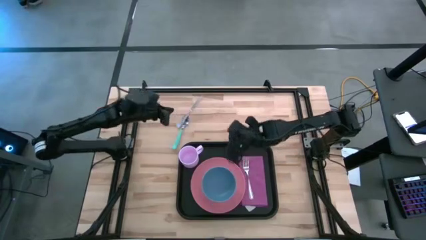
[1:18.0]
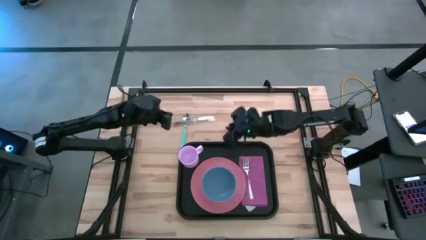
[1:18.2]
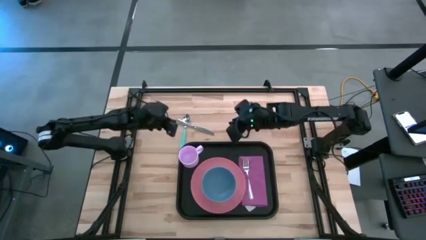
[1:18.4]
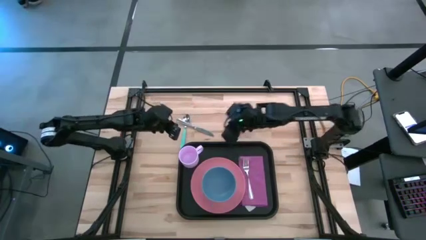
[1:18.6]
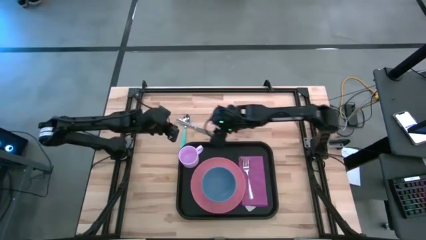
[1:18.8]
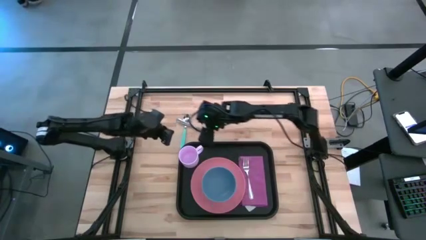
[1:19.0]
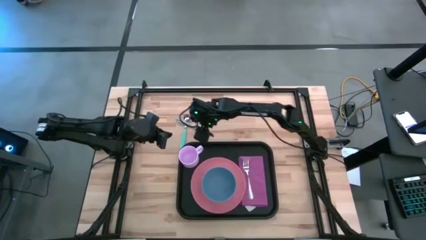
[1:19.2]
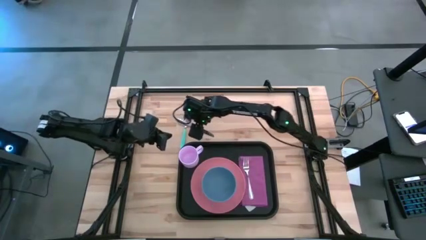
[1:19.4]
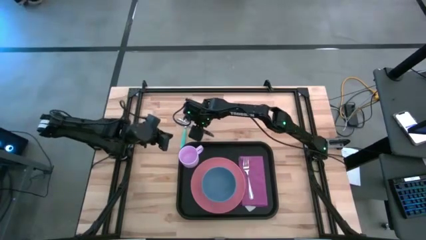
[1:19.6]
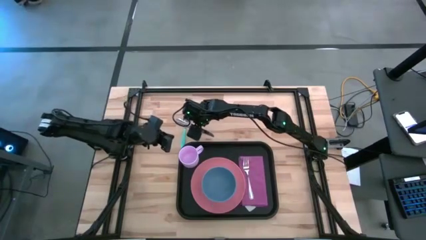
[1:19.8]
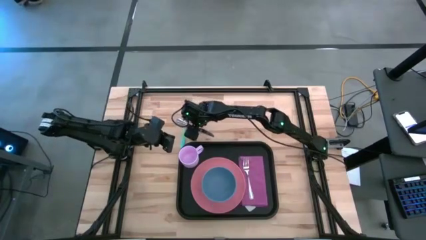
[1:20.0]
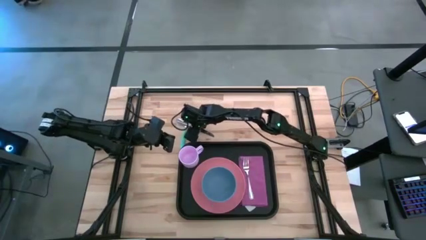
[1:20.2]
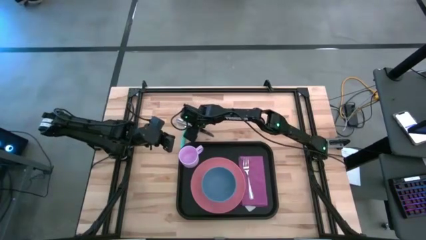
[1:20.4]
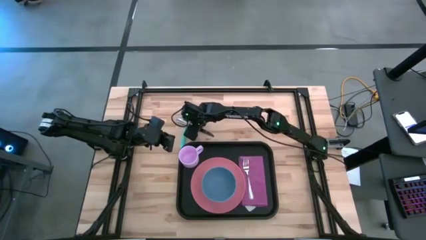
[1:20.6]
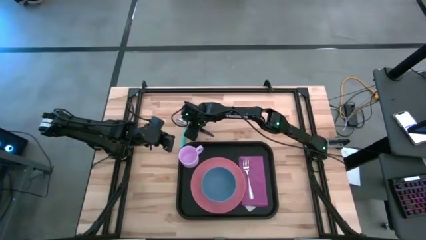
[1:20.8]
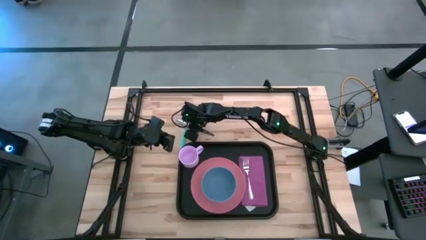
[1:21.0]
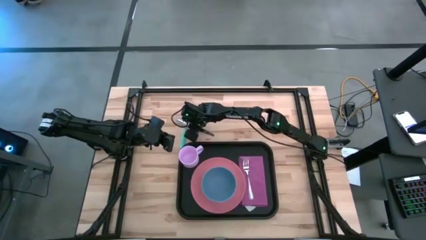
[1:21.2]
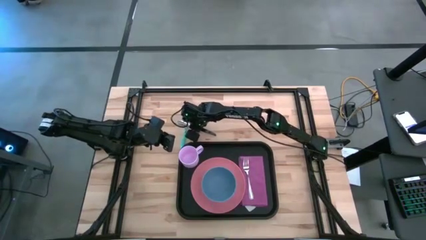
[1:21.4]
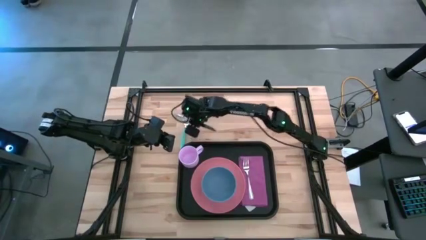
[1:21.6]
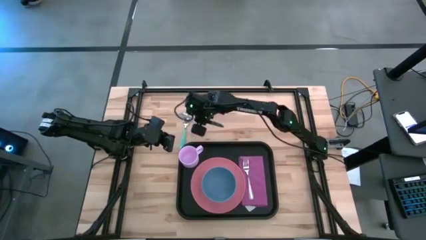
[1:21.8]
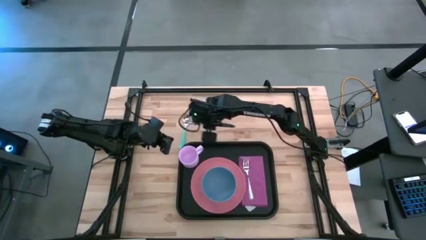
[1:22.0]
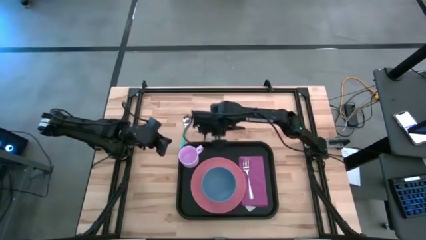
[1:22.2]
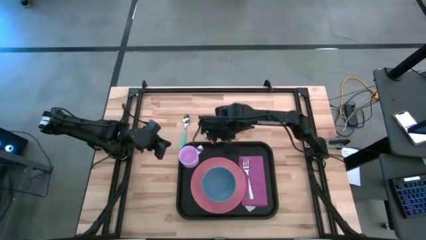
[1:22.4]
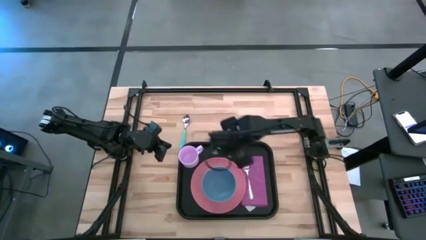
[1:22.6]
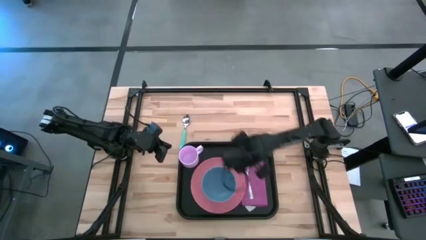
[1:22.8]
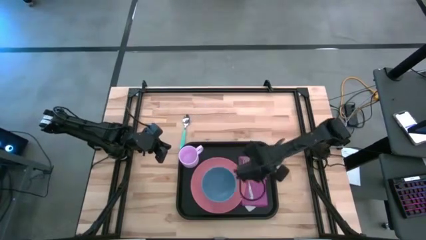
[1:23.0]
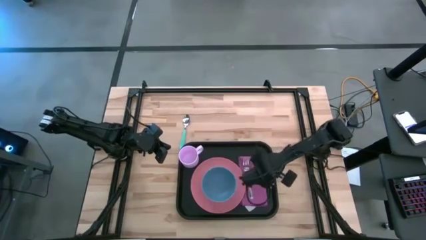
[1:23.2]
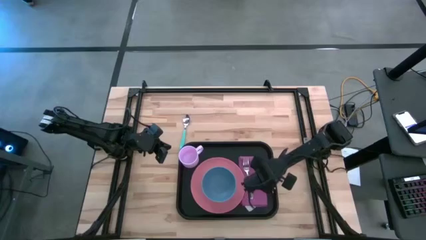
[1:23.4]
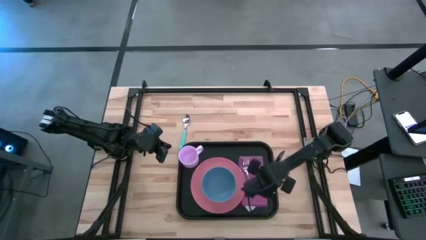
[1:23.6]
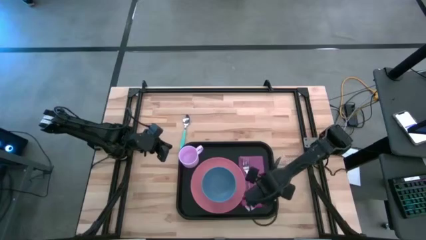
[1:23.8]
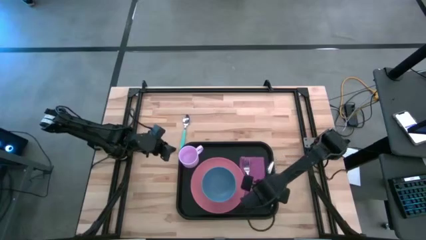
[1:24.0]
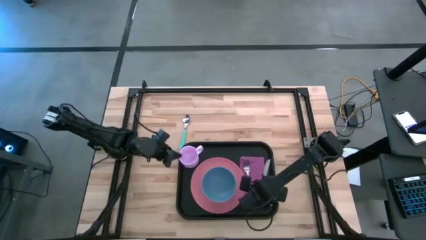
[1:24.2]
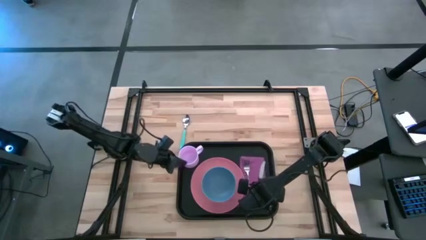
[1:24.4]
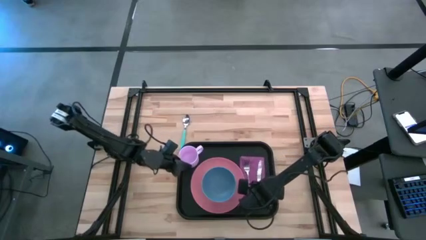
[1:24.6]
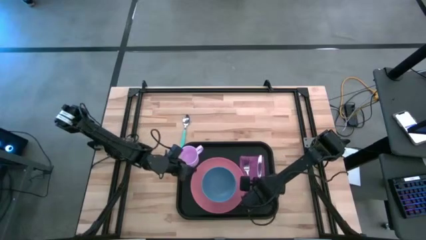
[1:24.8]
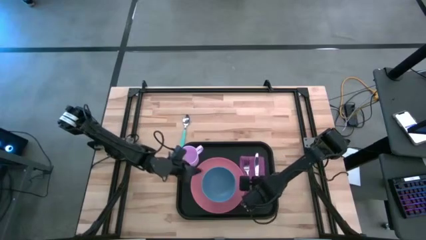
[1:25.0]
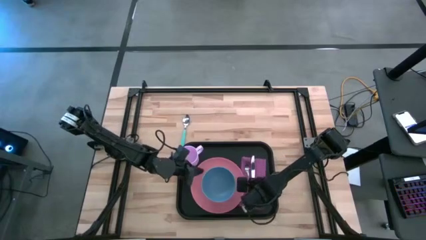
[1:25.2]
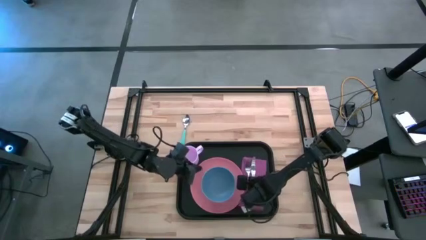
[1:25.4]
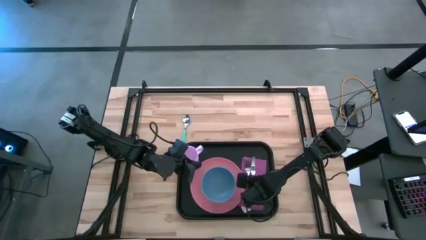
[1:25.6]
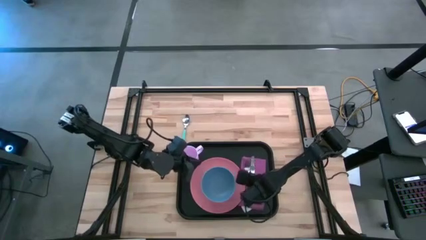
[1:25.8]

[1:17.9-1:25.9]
Task: Set up tray
Put the silver knife on top of the purple napkin to the right of the silver fork on the black tray

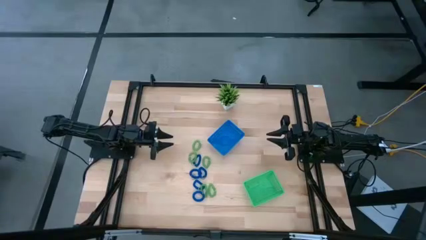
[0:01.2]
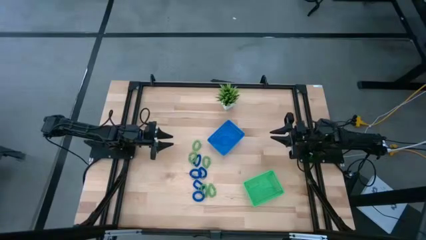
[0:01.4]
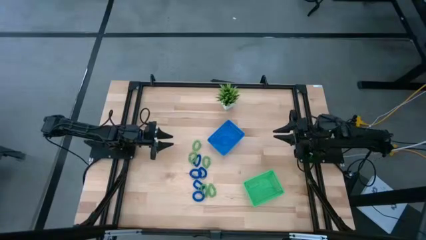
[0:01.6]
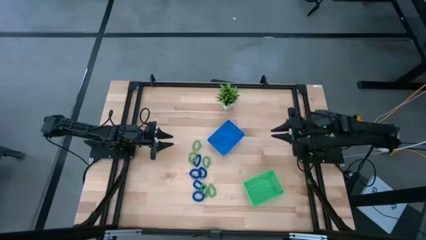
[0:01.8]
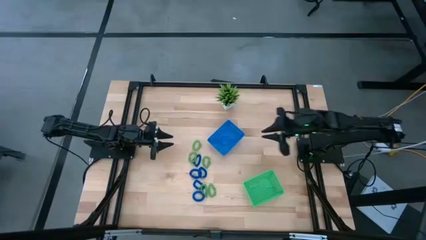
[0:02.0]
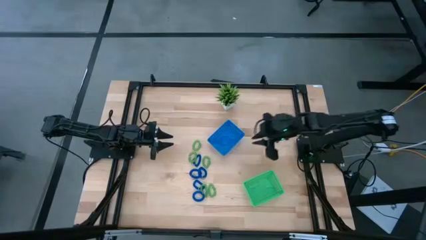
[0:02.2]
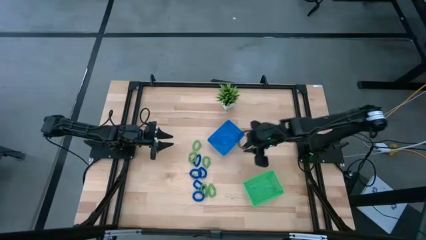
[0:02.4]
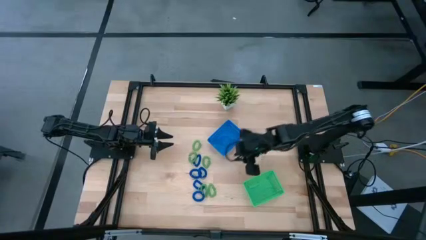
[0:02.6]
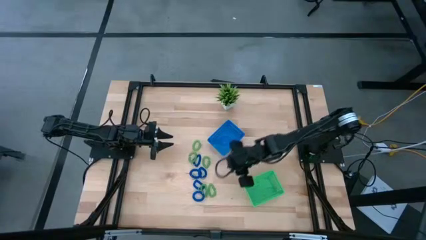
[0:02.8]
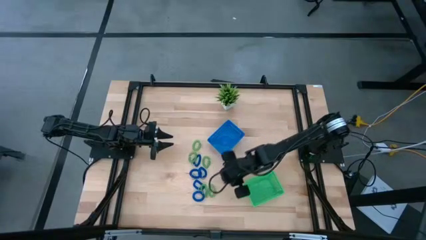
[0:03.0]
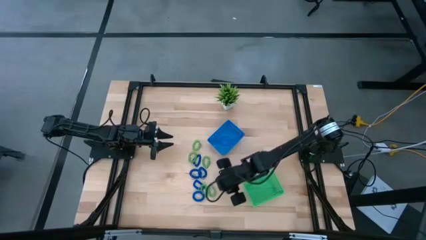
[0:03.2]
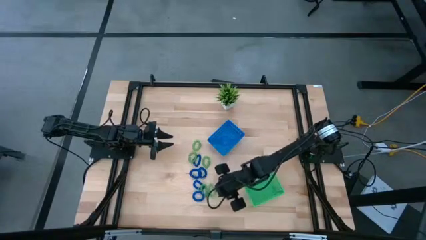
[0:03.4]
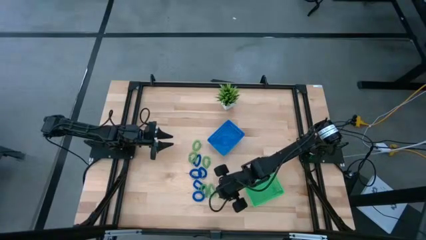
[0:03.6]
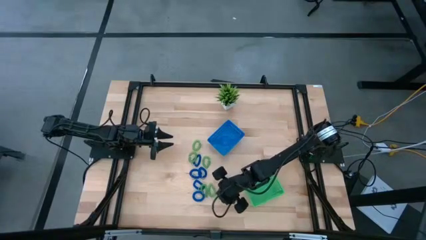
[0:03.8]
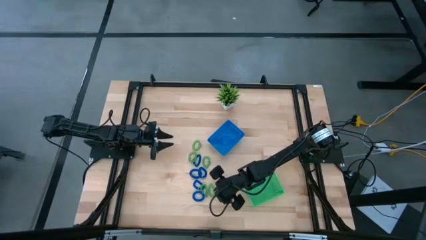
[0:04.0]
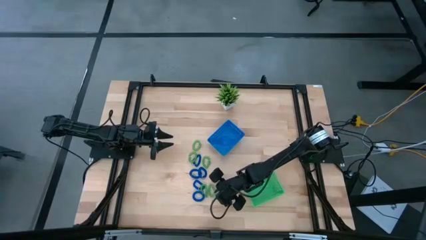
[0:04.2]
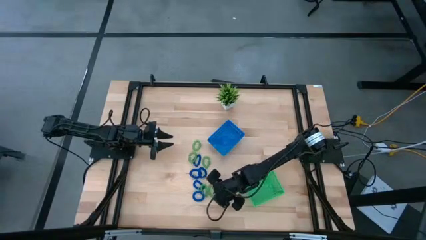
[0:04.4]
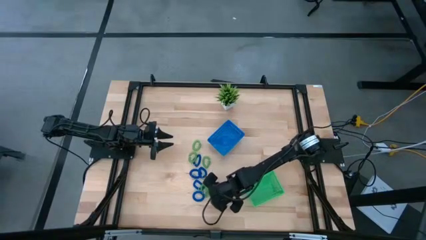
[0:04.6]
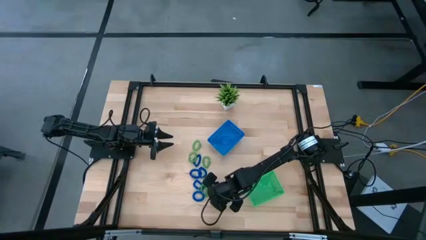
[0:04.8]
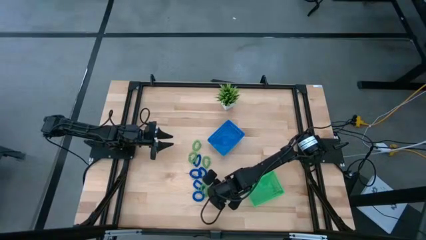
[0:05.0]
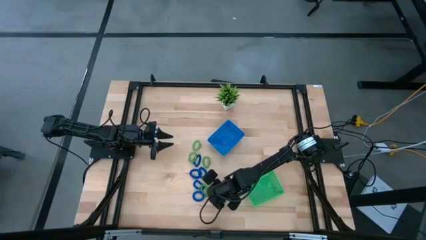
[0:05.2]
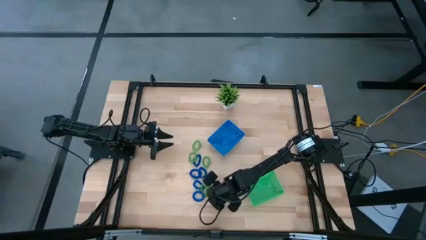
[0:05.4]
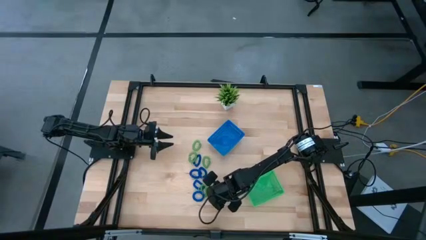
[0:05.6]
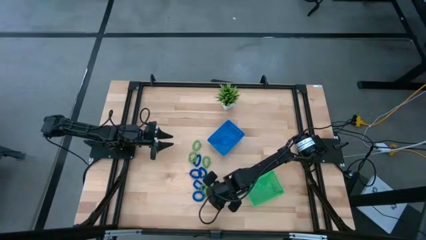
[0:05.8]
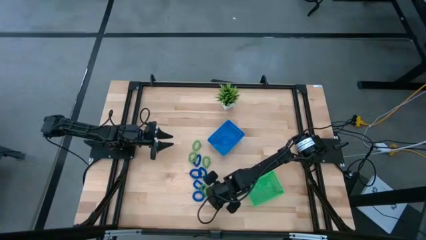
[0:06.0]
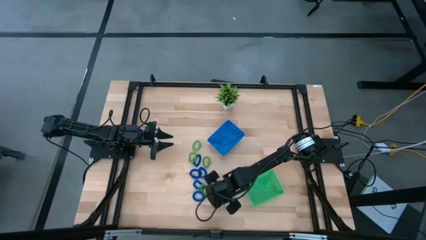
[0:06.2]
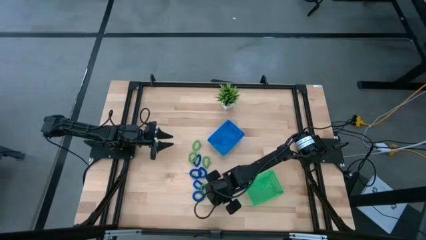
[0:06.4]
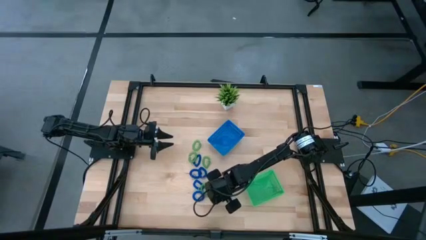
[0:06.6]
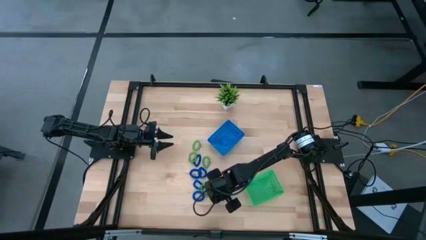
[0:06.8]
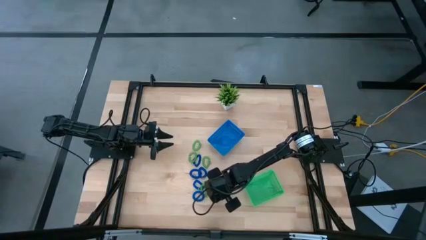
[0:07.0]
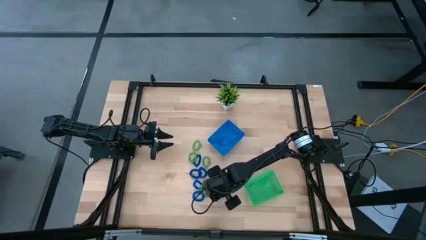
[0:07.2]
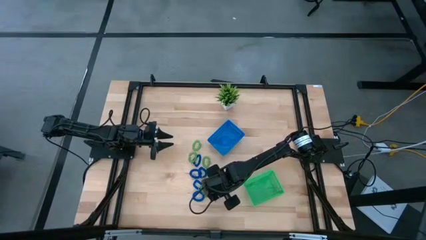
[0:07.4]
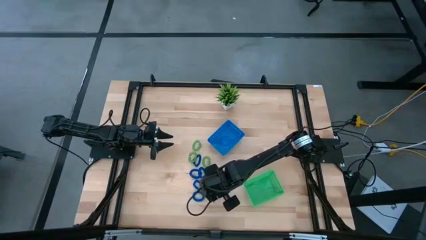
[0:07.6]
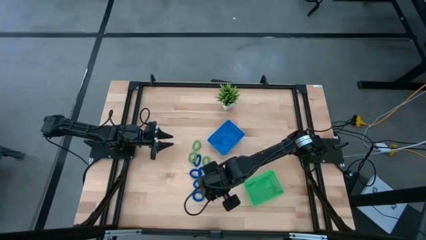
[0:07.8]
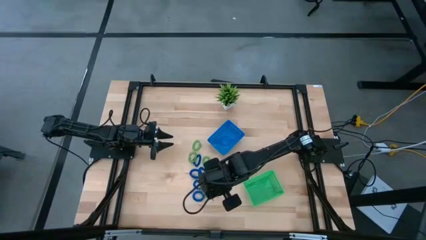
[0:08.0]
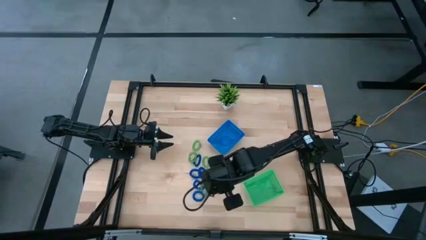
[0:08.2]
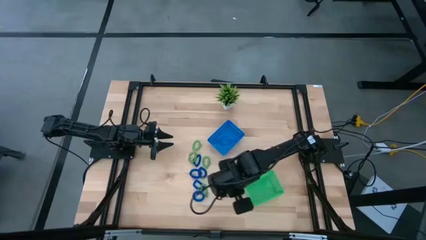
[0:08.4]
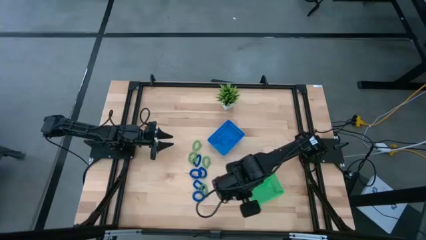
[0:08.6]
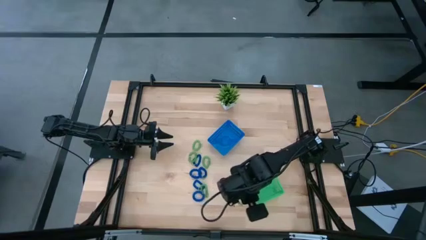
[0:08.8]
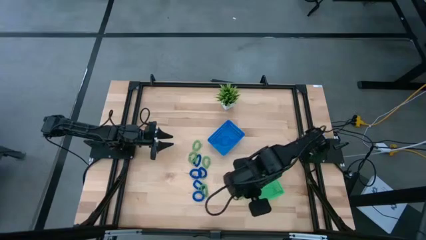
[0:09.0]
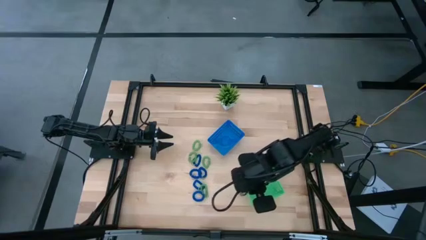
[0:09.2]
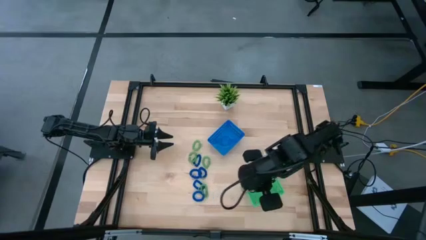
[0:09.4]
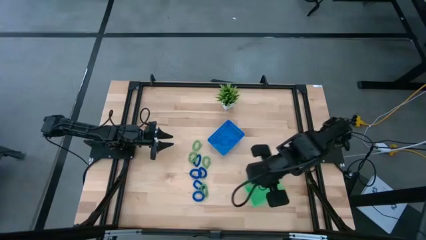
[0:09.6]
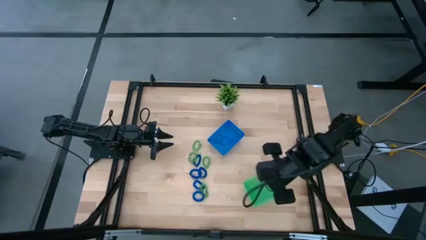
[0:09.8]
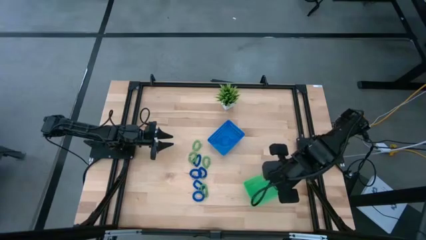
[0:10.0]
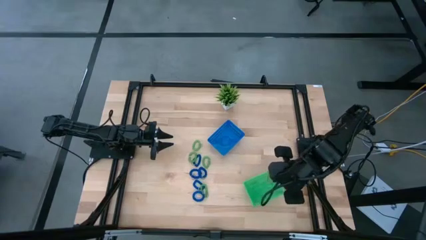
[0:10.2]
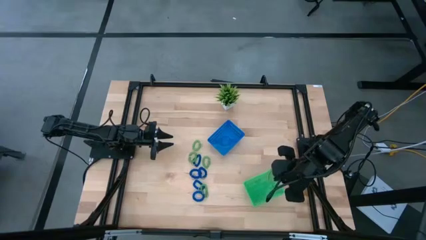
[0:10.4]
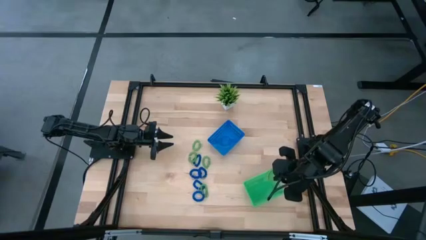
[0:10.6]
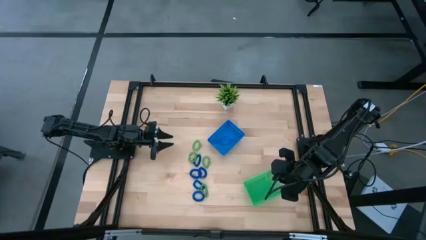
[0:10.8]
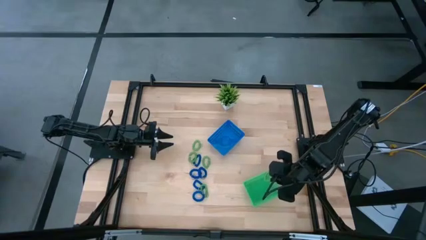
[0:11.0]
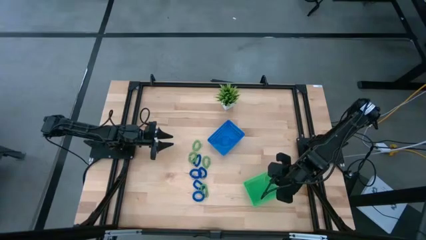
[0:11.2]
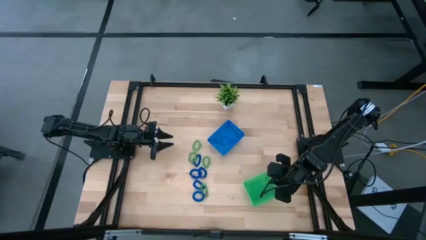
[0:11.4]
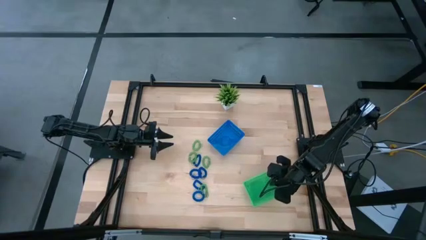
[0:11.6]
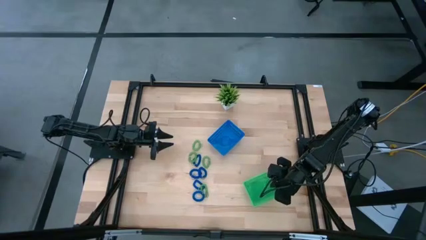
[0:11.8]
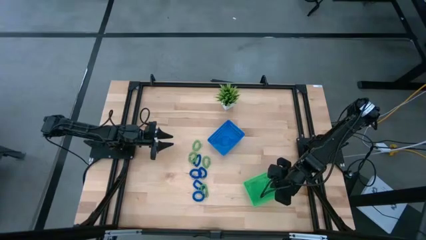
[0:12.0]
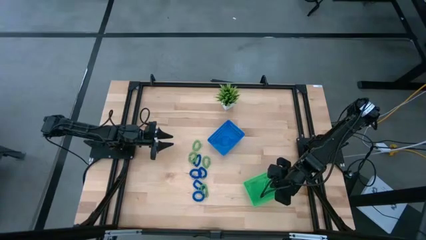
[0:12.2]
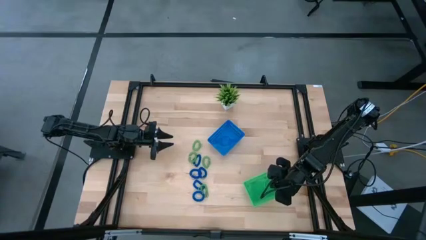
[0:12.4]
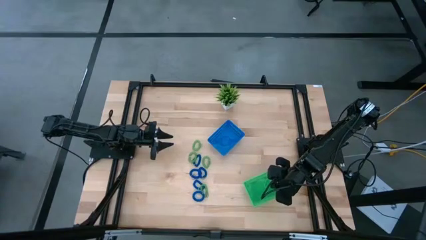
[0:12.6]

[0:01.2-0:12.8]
Task: Sort spring keychains
Put the green spring keychain into the green bin
